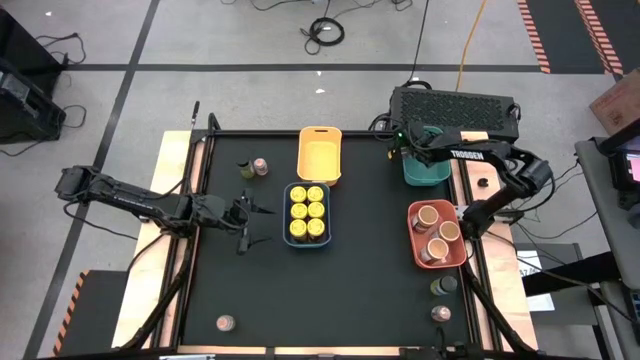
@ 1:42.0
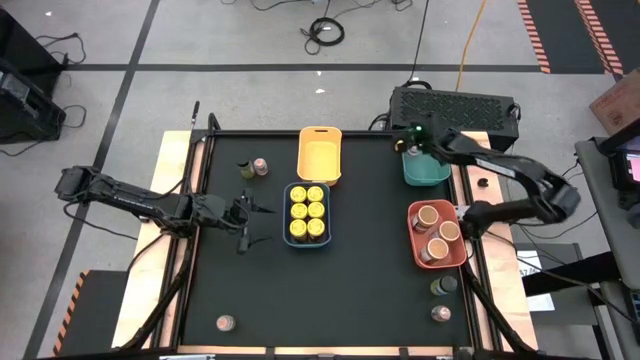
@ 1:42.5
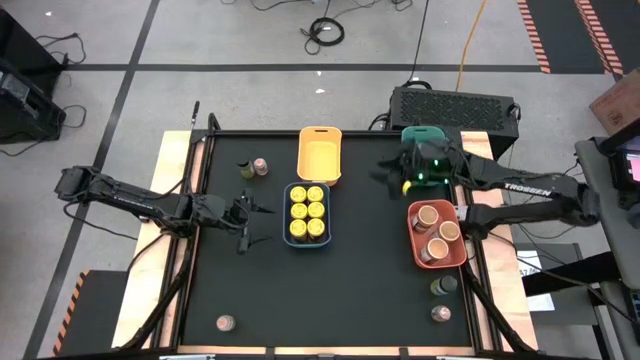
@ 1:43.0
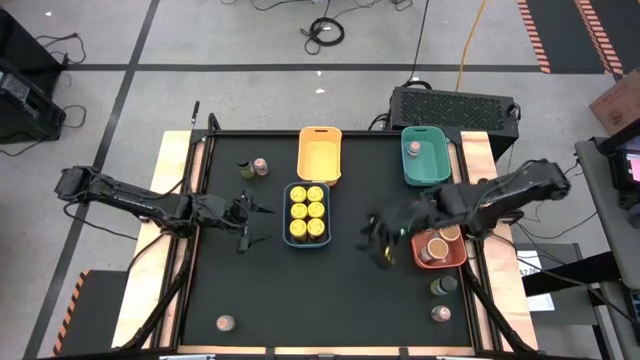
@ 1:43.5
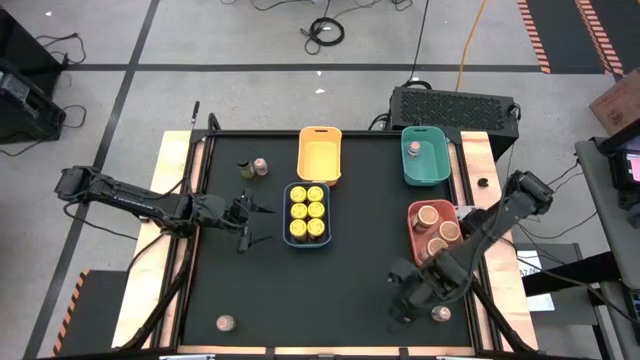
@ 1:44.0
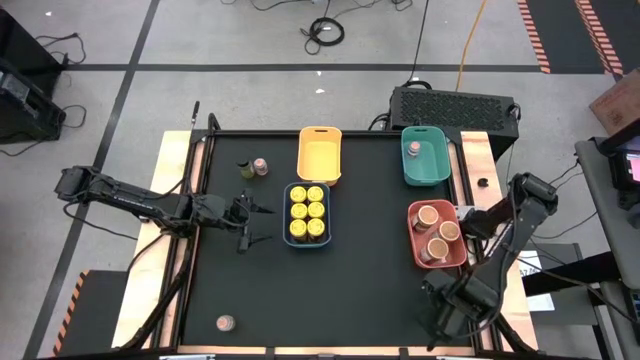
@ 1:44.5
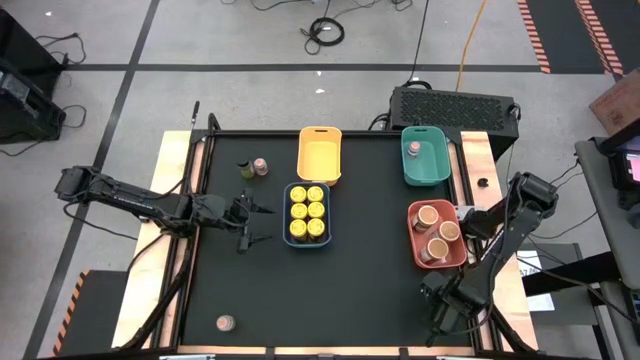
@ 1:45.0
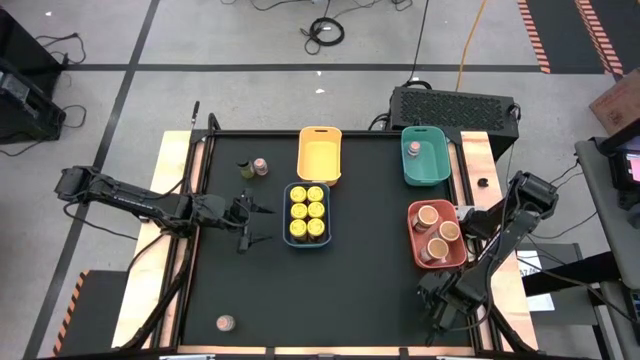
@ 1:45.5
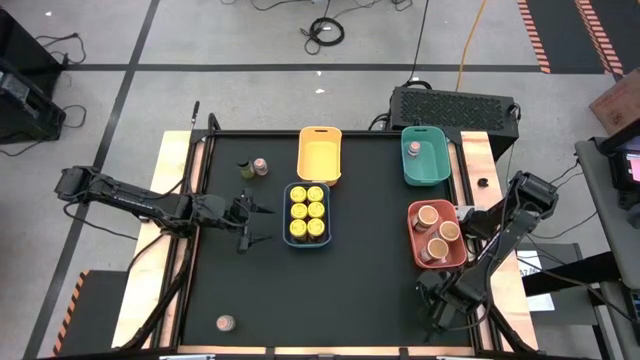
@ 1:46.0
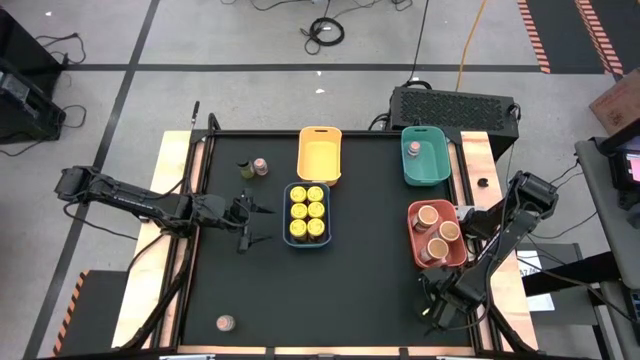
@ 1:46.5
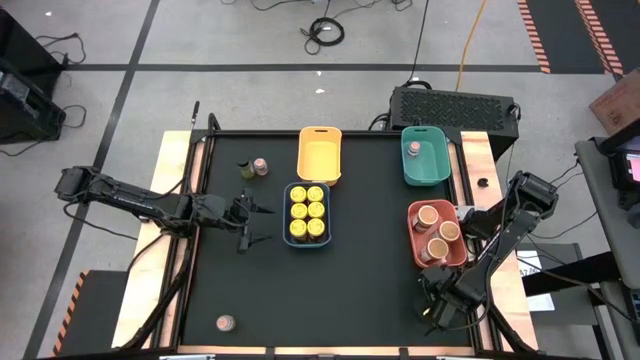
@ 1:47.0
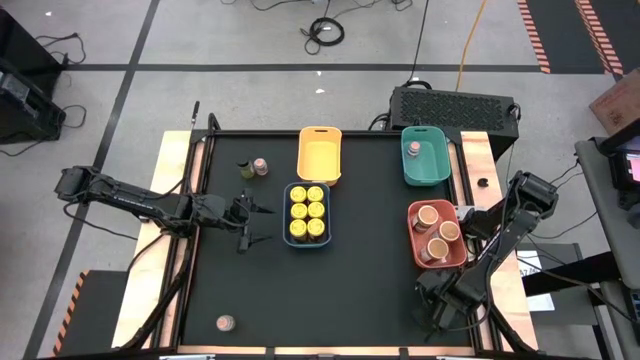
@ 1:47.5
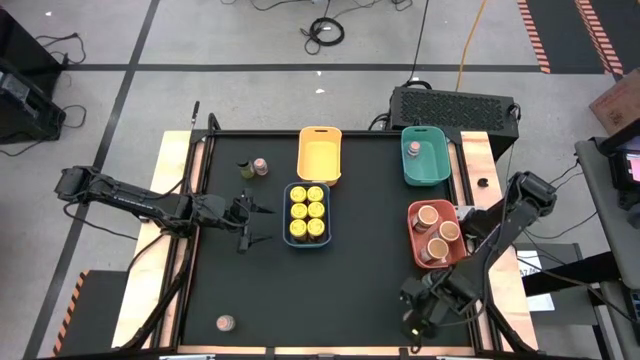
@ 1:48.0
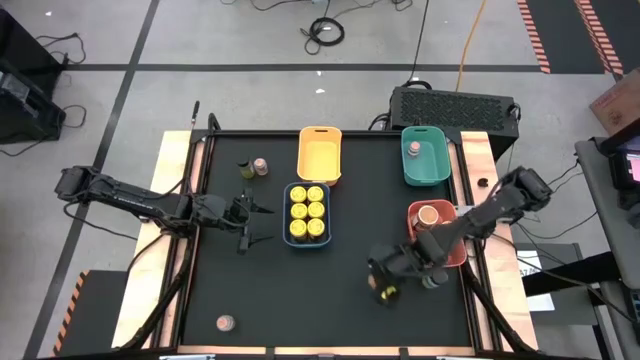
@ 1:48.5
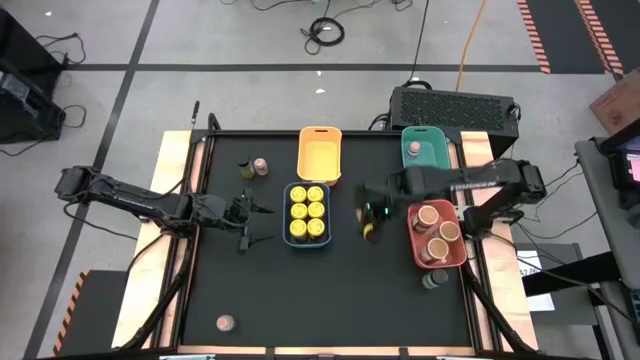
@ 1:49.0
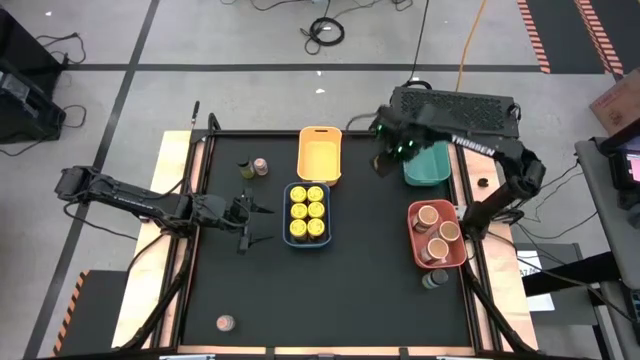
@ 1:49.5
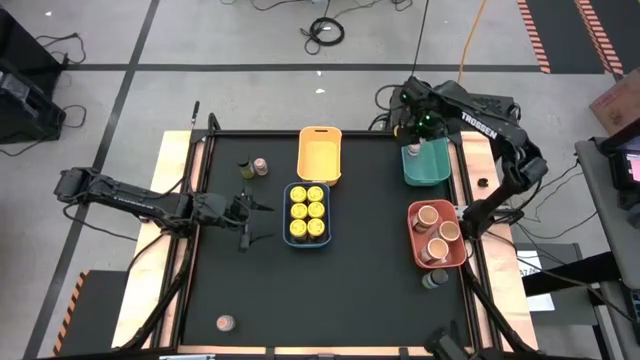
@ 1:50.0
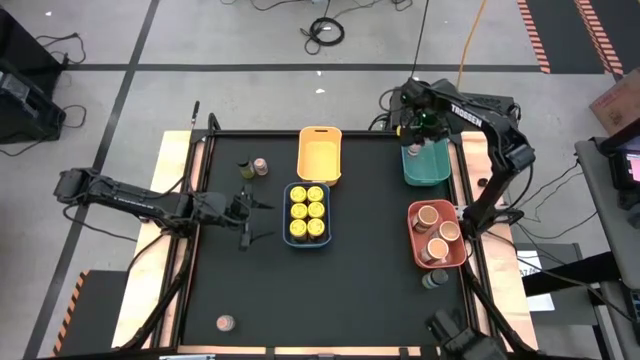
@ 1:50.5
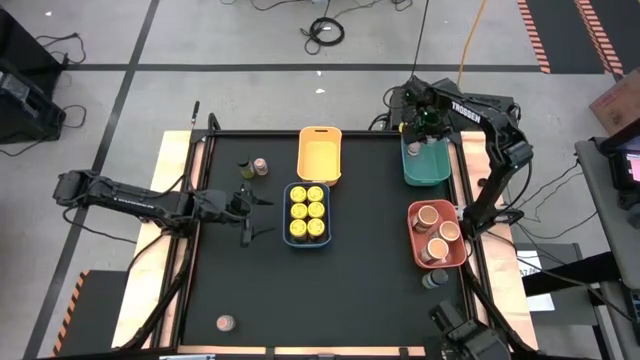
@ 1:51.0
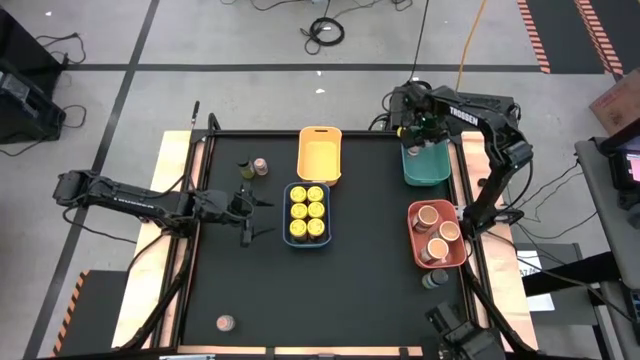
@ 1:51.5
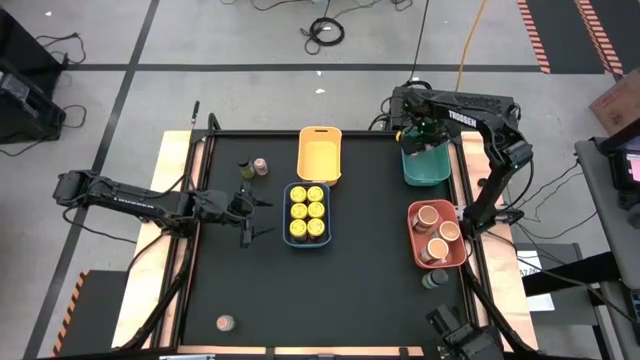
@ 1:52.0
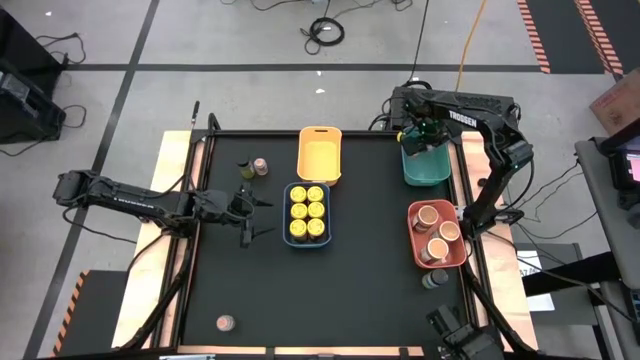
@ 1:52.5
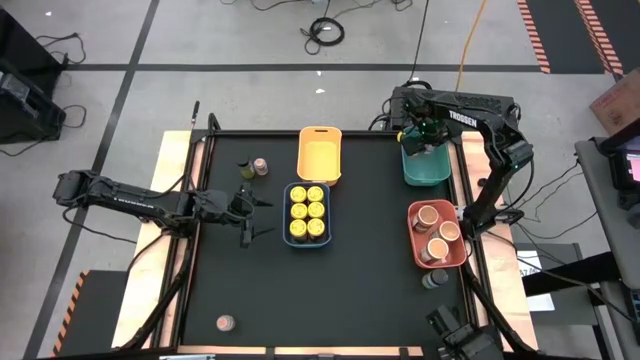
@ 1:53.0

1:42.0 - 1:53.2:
Task: Sort spices by type
Put the brown seasoning bottle into the green bin

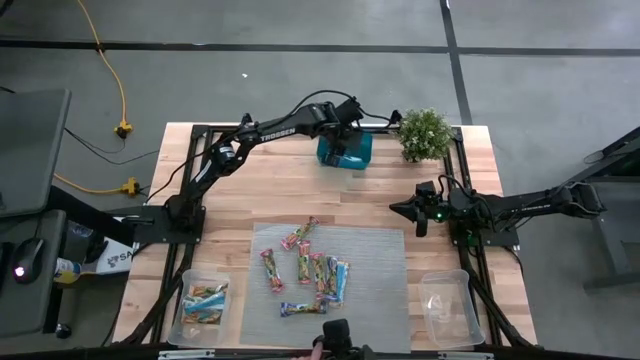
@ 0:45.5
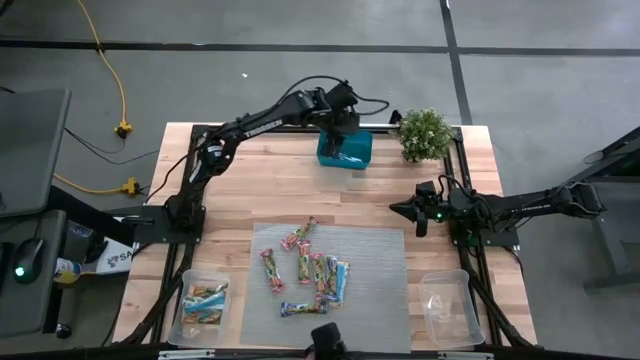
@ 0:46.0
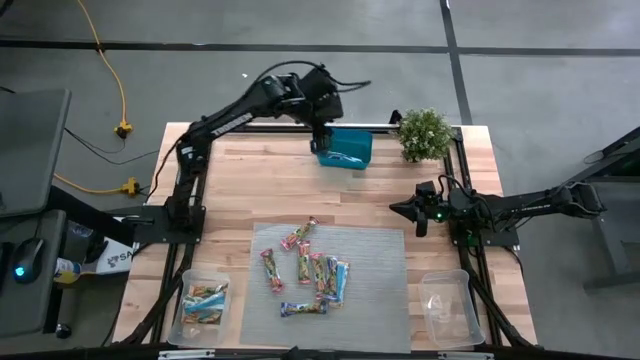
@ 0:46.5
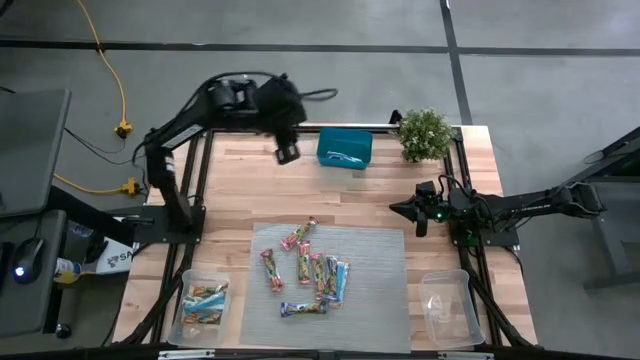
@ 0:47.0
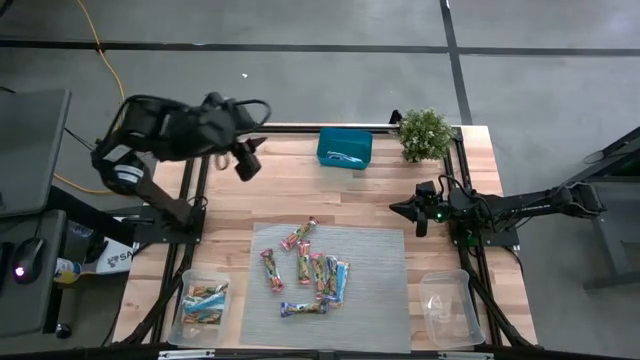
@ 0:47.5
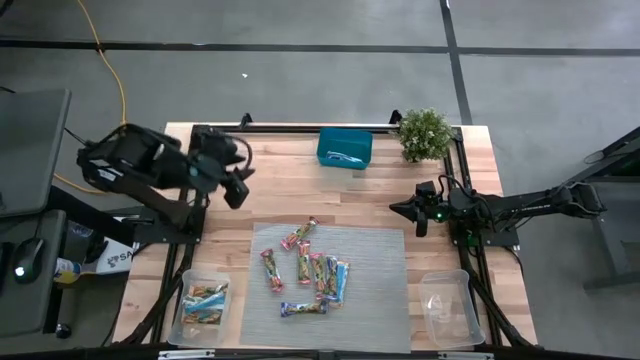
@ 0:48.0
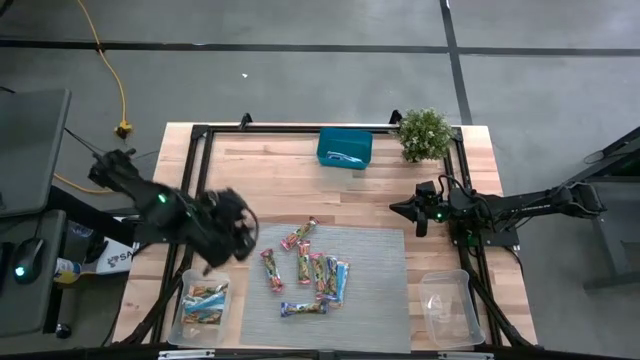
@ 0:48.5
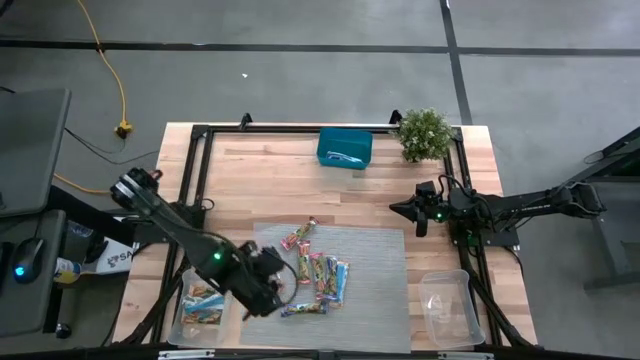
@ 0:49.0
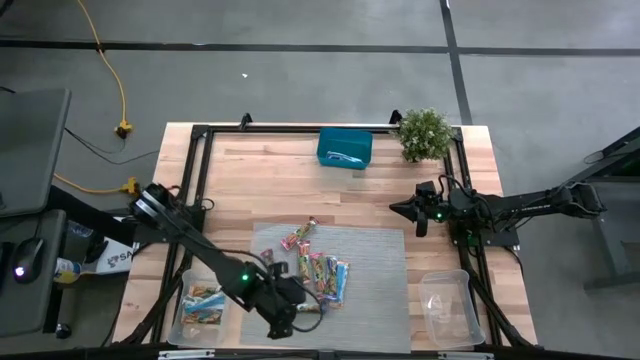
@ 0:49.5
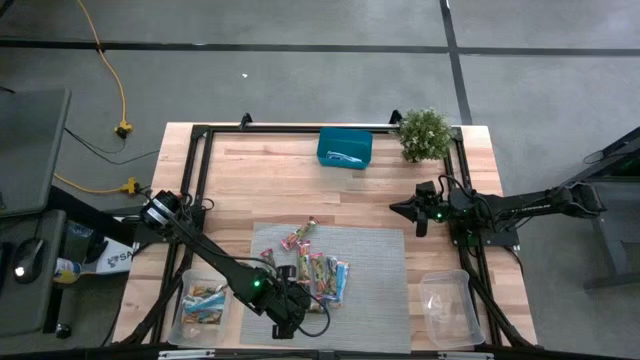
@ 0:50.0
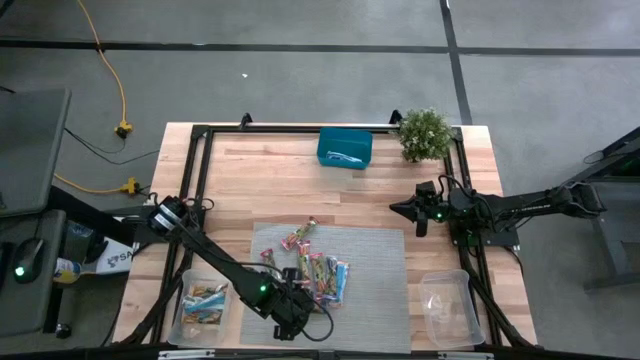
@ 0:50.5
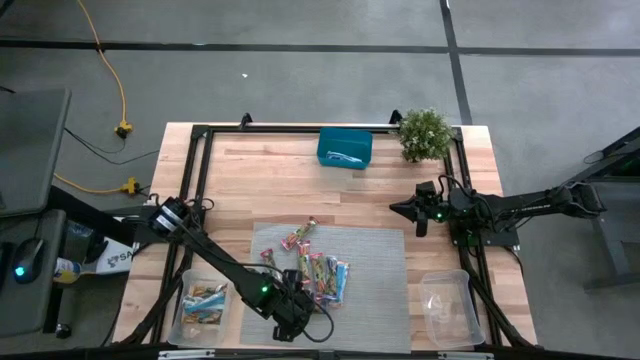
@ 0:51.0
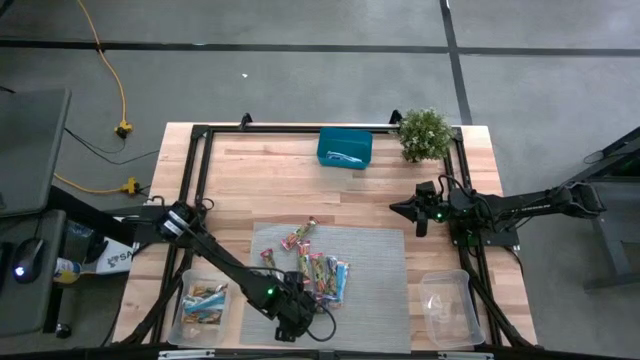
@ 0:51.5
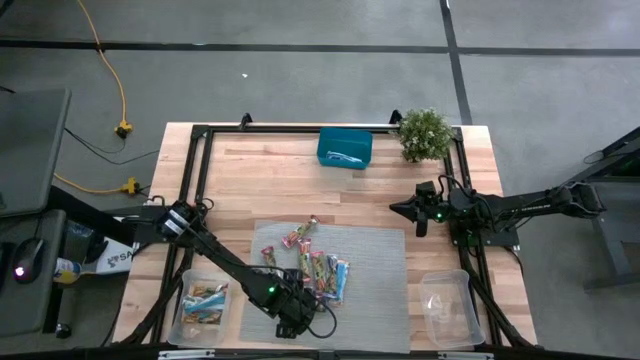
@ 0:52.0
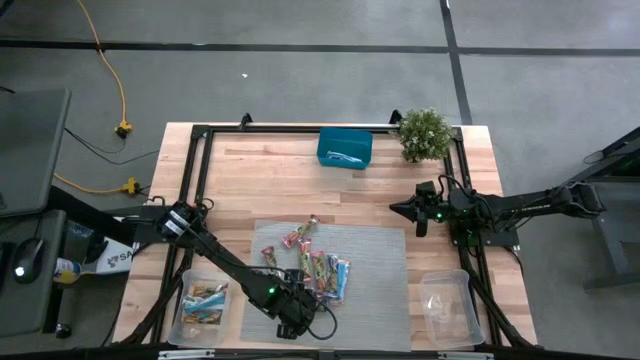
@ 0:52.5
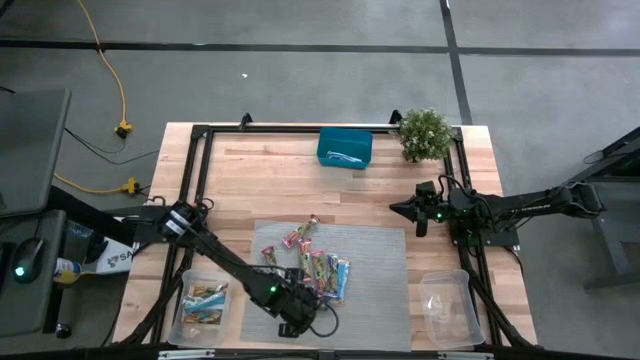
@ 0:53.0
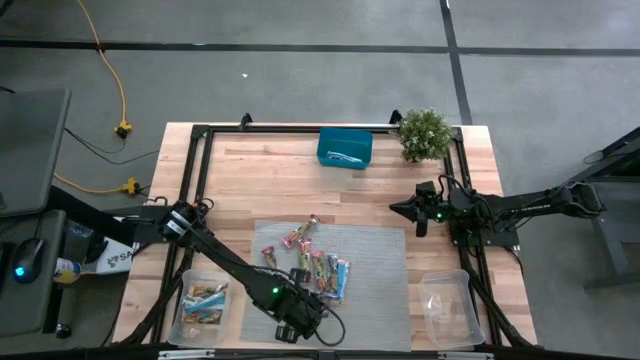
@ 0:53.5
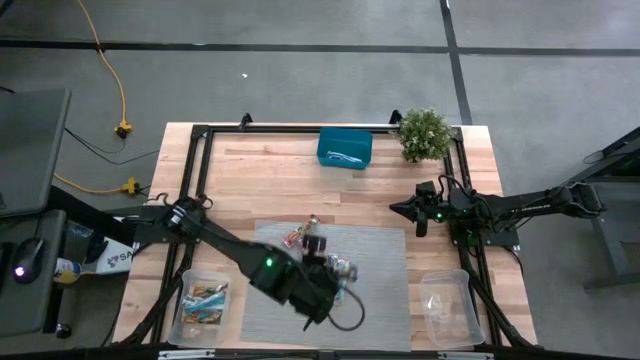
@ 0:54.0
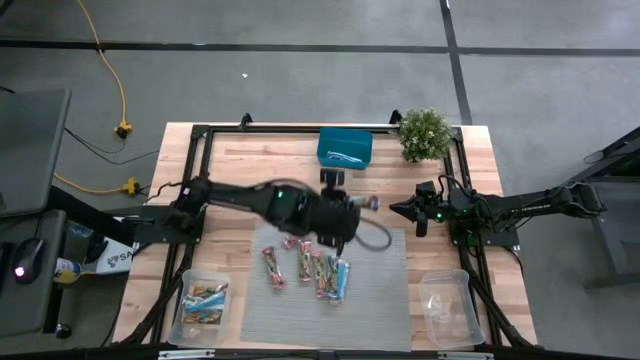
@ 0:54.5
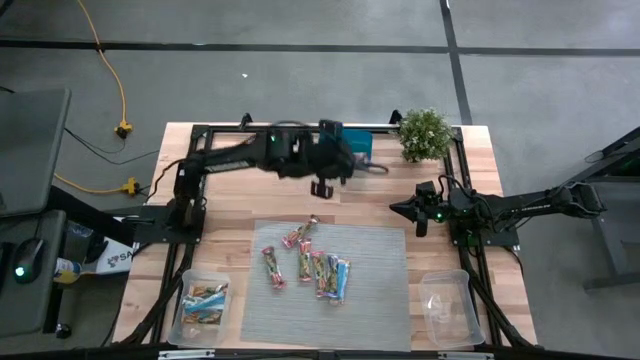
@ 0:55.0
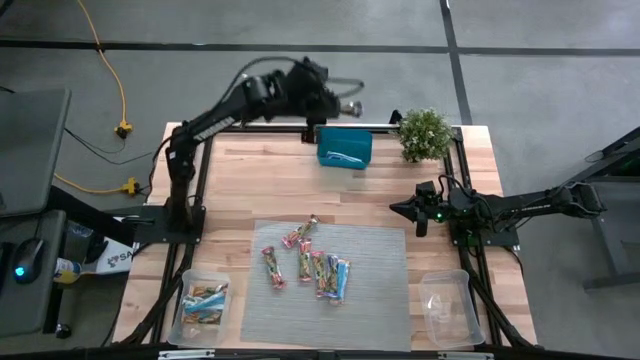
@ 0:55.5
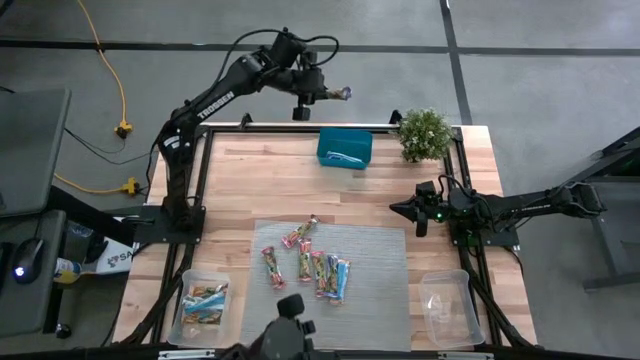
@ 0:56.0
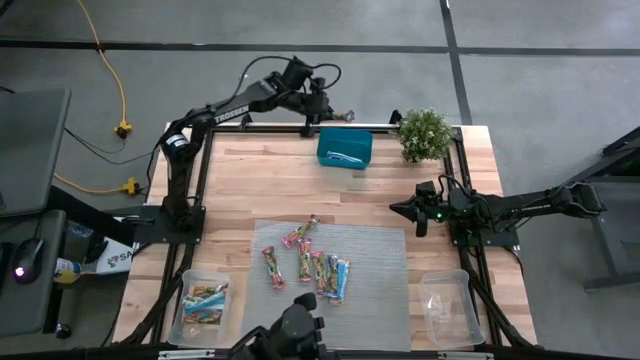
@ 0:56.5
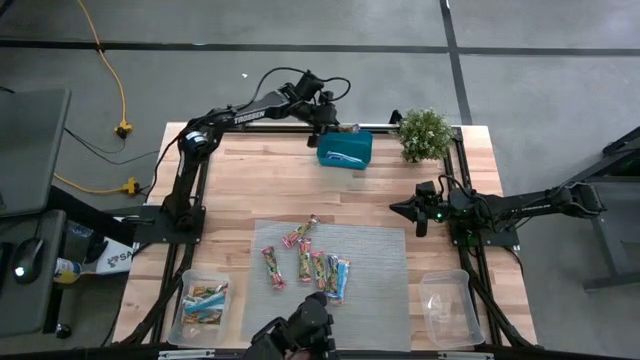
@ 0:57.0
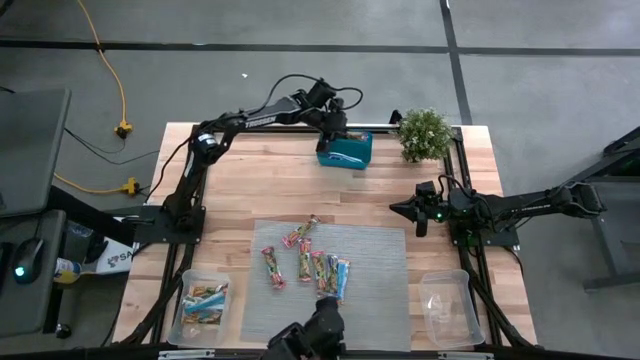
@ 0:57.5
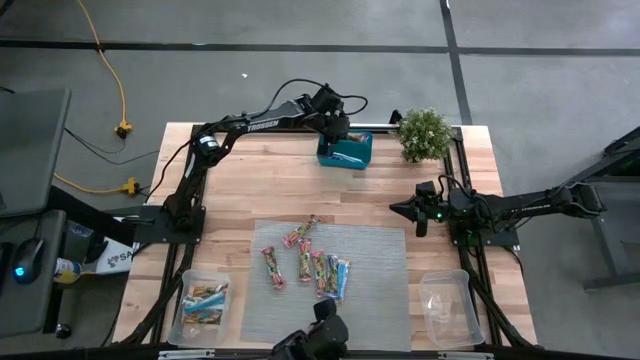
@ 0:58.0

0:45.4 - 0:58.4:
Task: Pick and place Granola Bars by type
Put the blue granola bar into the blue bin
